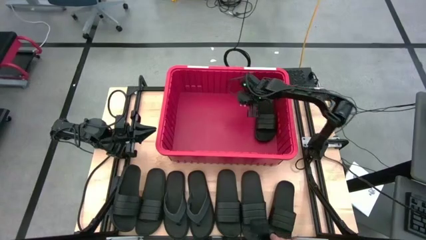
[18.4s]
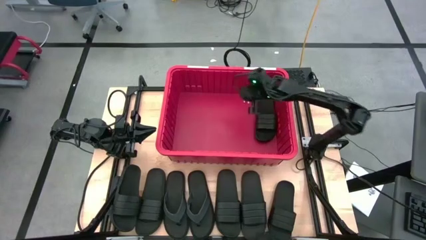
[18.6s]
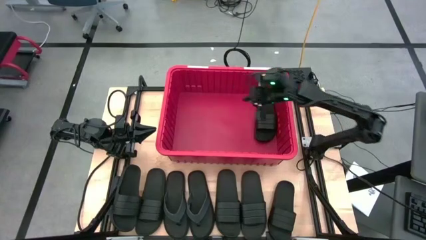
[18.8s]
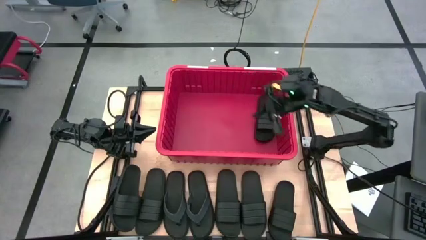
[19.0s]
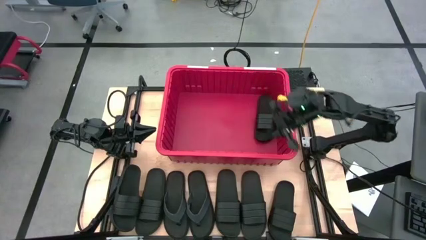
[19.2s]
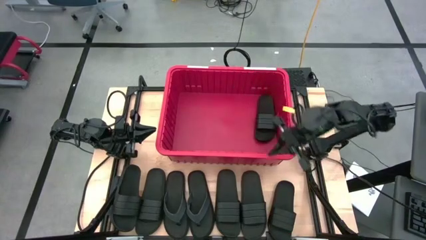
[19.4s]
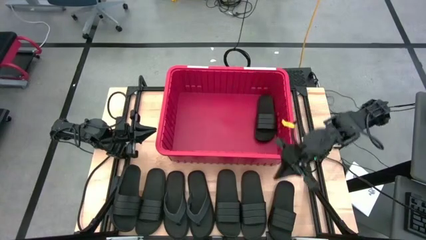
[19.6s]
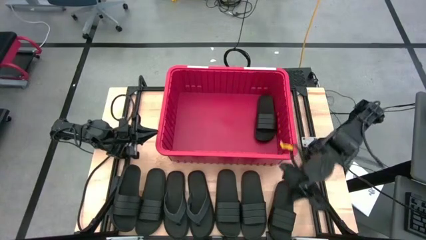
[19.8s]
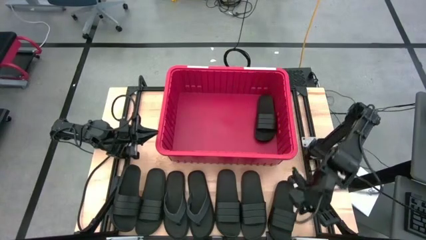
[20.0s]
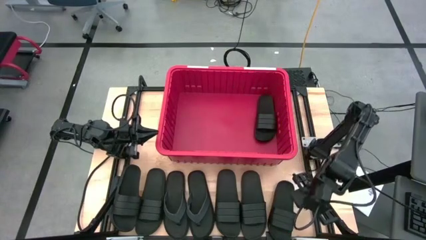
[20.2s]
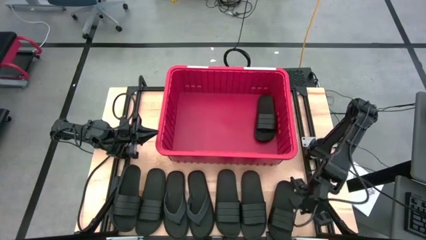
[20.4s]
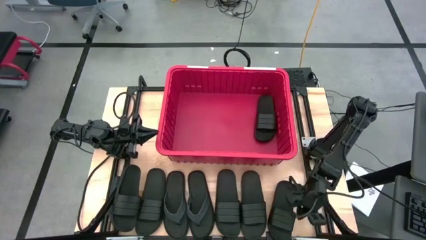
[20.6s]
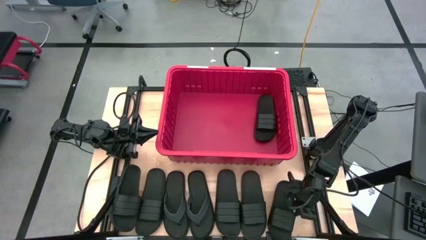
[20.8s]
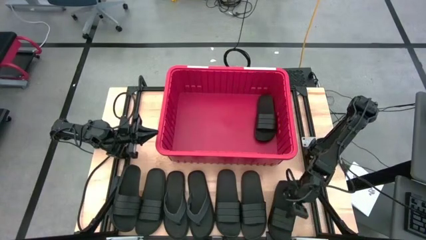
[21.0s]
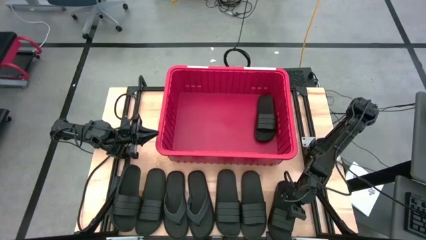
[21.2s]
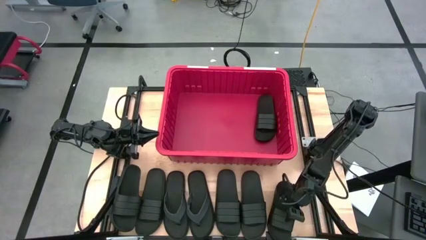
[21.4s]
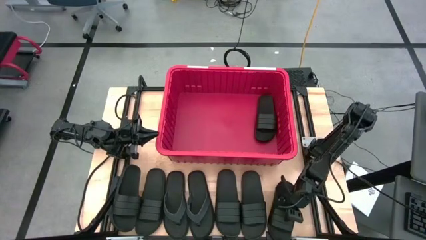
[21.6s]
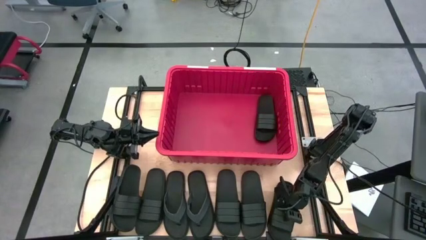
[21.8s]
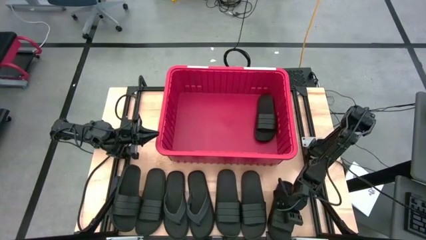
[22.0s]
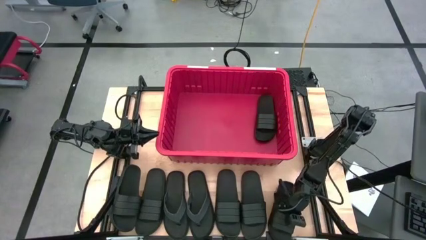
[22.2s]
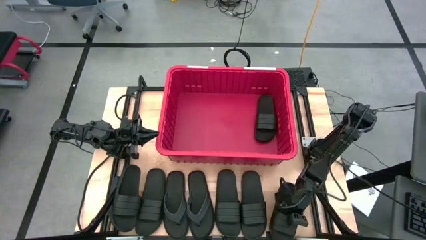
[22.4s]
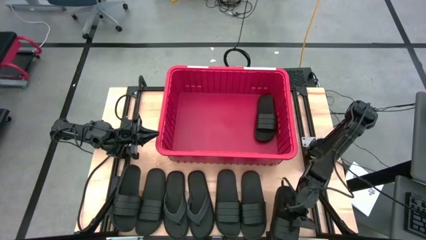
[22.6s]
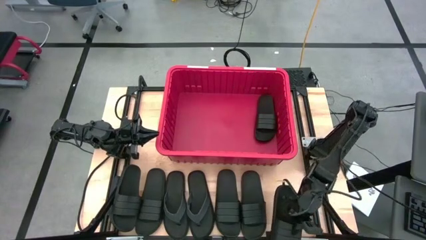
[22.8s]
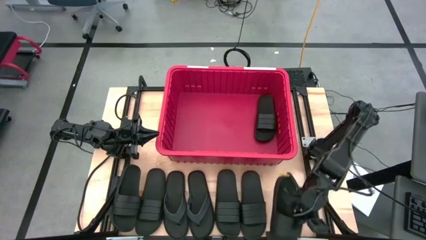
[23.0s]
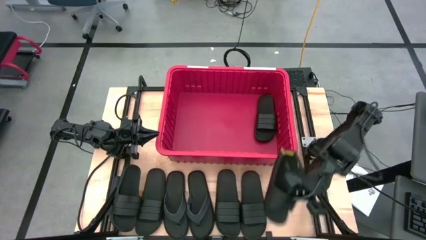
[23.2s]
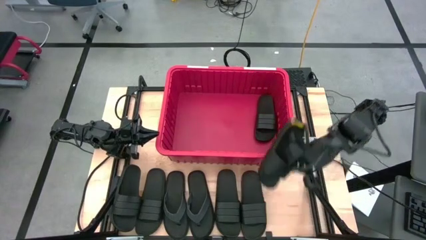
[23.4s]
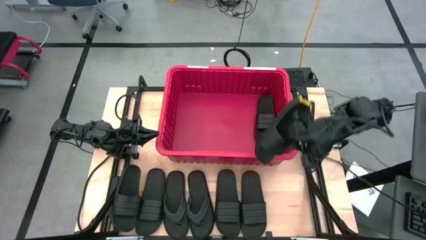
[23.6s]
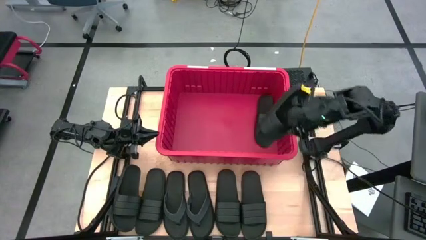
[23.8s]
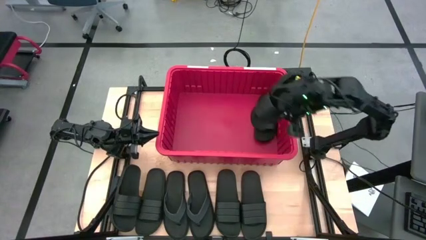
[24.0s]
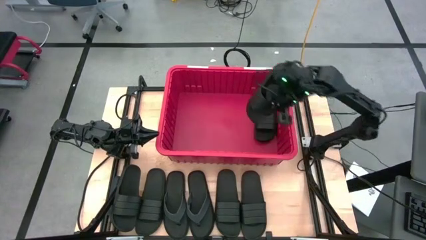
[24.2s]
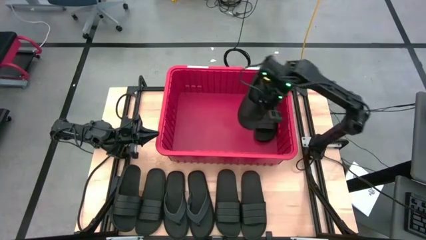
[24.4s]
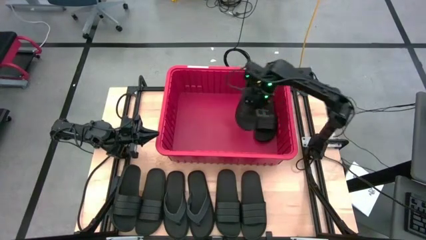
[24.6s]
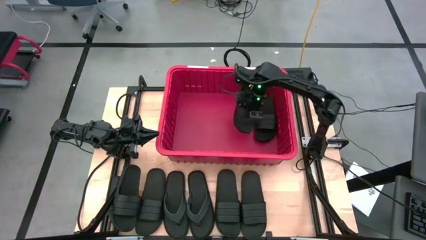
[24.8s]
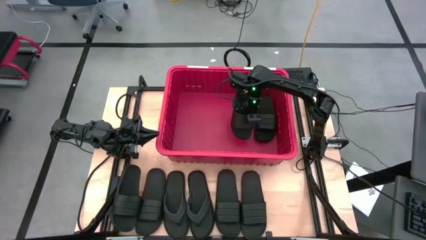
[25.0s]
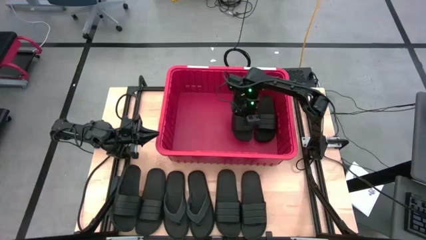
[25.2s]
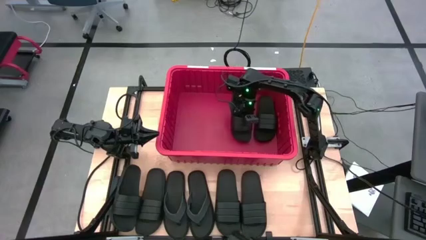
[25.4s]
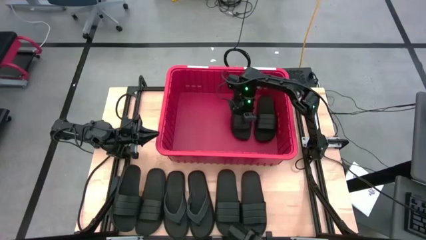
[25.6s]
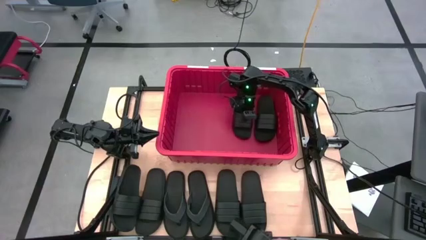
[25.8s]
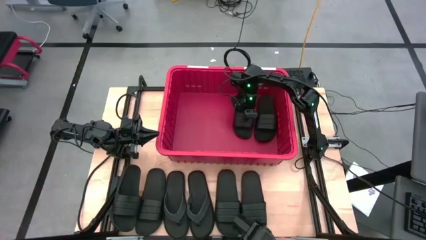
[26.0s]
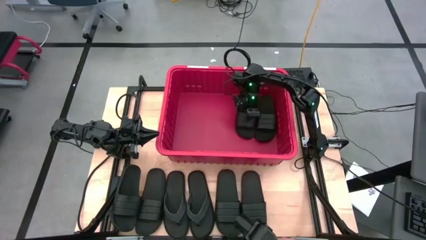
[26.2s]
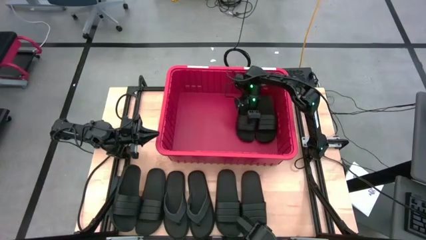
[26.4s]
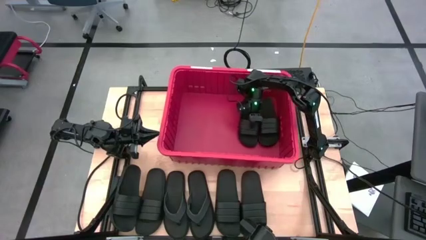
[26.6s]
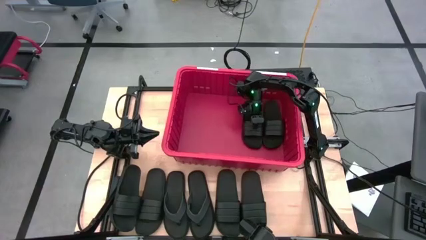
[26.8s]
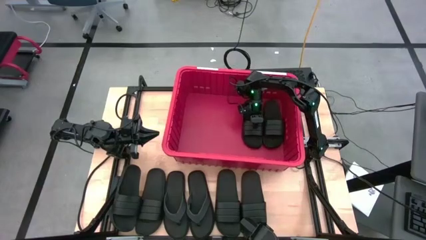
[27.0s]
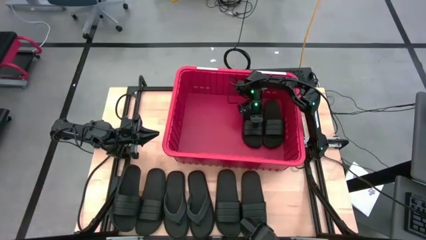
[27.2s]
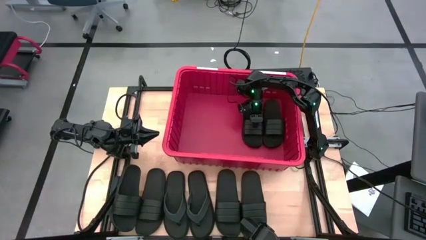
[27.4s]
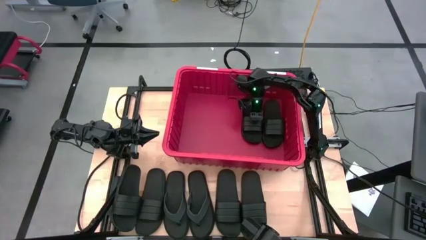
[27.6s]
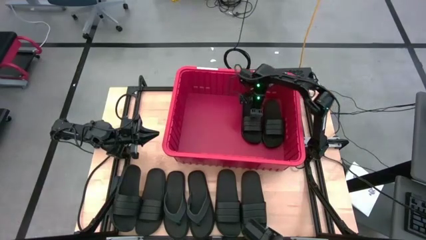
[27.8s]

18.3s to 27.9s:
Task: Pick and place slides into bin
Put the black slipper into the red bin

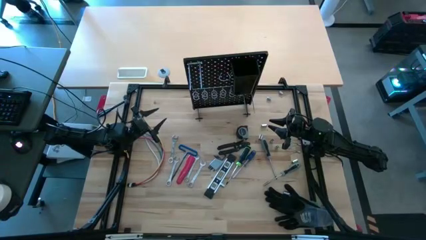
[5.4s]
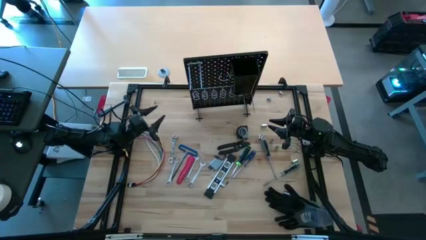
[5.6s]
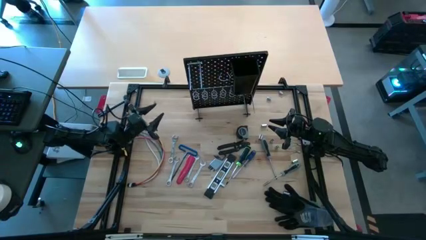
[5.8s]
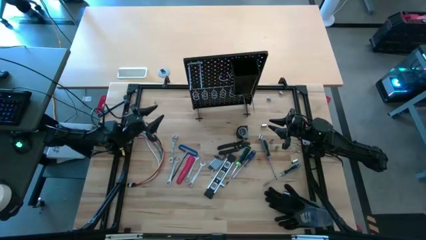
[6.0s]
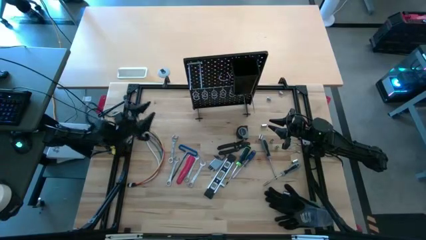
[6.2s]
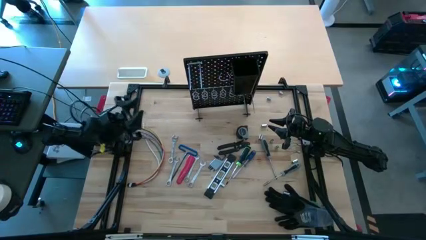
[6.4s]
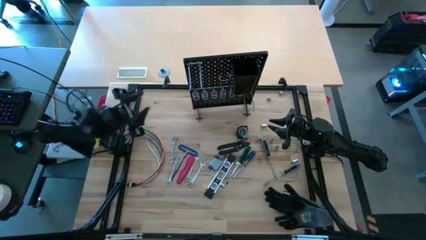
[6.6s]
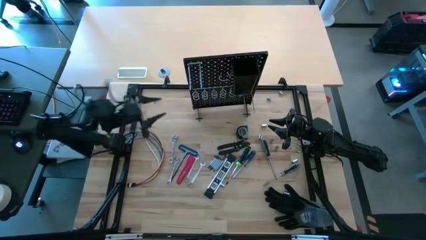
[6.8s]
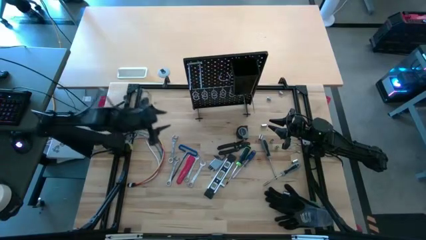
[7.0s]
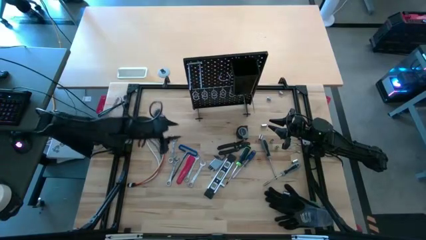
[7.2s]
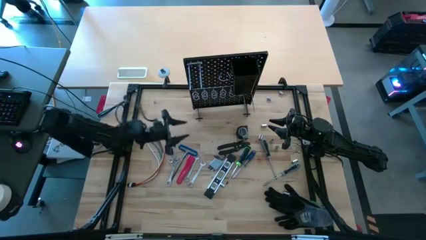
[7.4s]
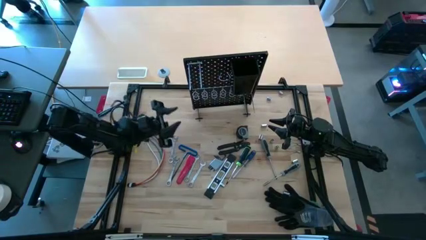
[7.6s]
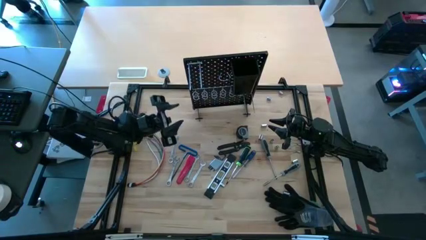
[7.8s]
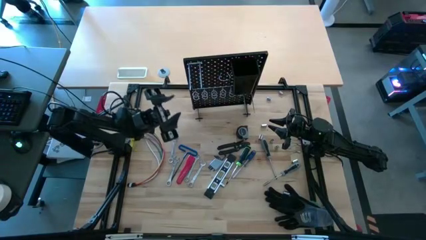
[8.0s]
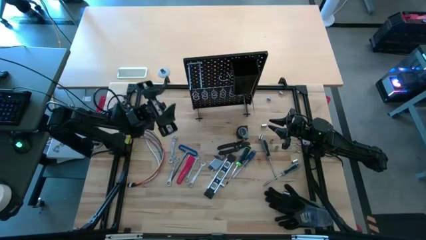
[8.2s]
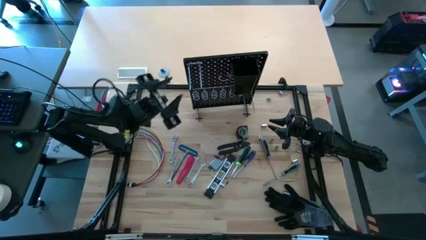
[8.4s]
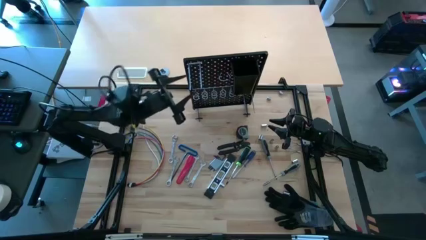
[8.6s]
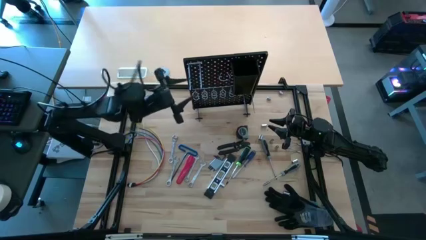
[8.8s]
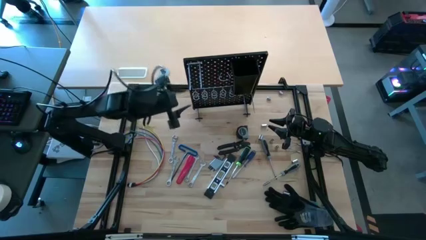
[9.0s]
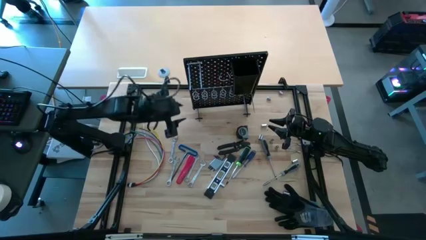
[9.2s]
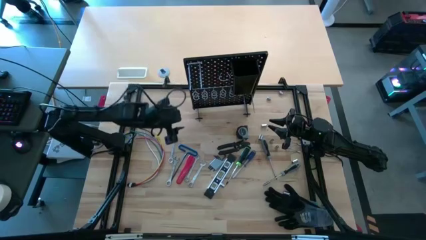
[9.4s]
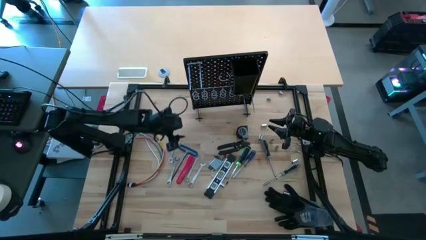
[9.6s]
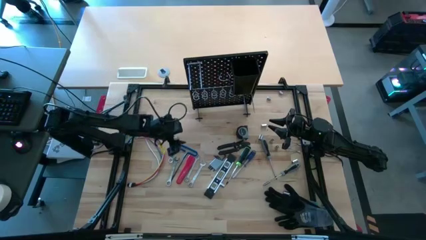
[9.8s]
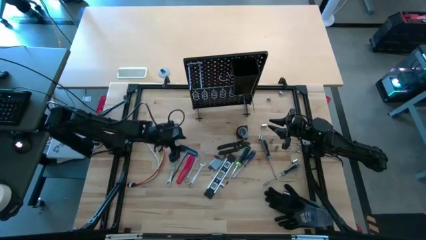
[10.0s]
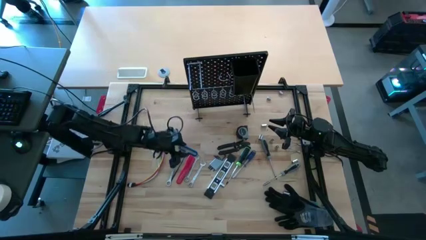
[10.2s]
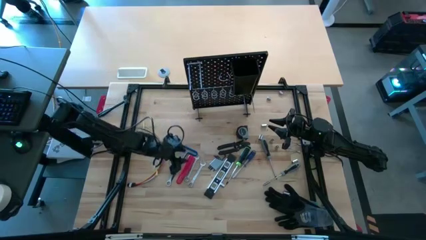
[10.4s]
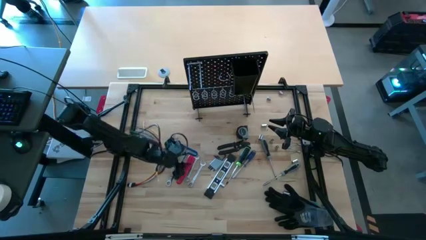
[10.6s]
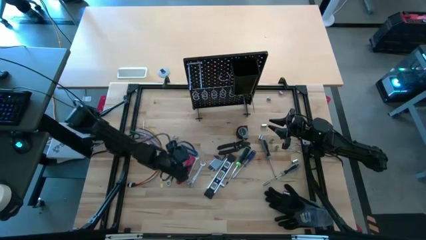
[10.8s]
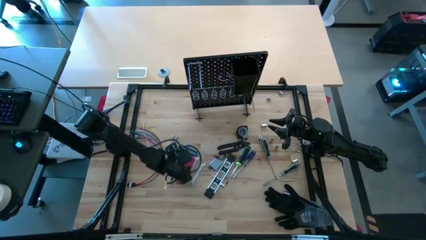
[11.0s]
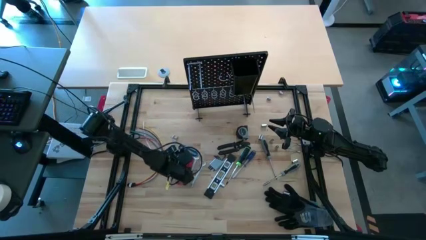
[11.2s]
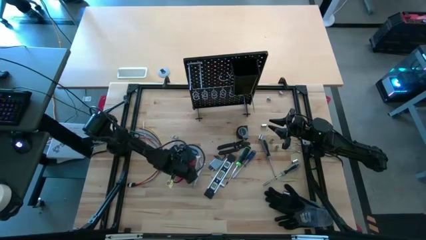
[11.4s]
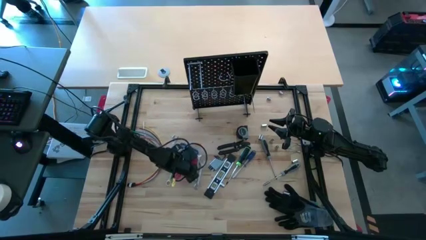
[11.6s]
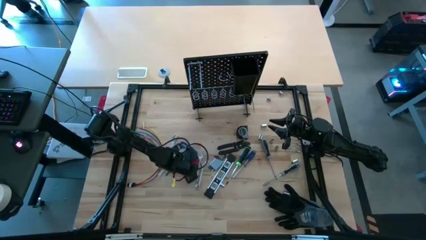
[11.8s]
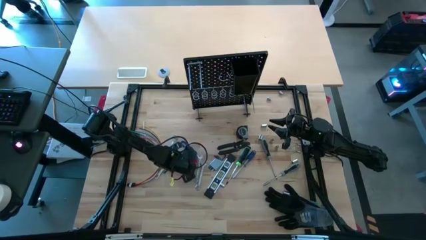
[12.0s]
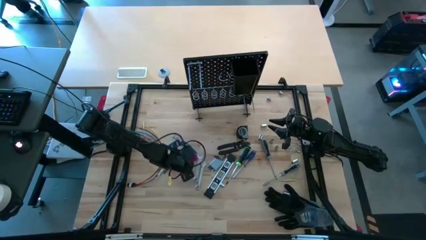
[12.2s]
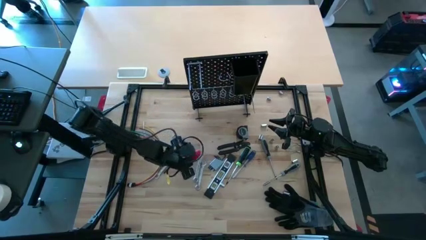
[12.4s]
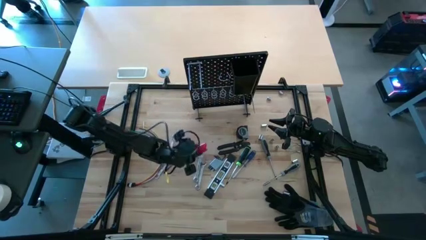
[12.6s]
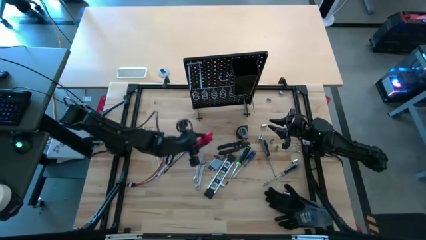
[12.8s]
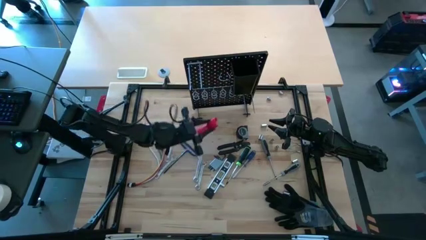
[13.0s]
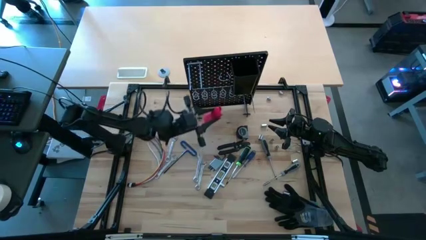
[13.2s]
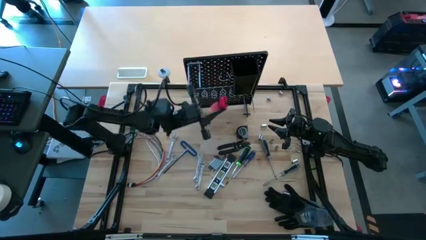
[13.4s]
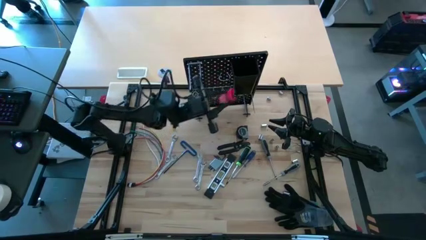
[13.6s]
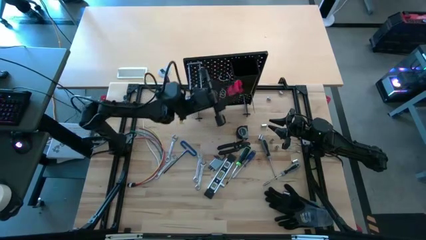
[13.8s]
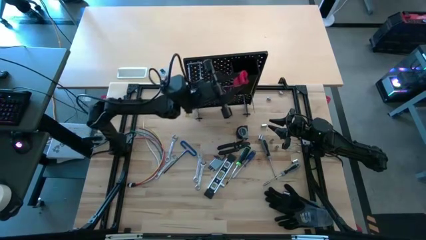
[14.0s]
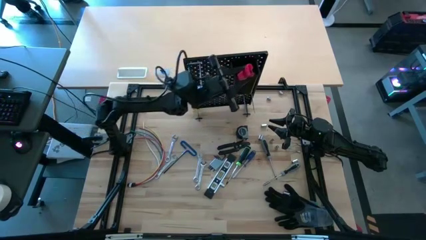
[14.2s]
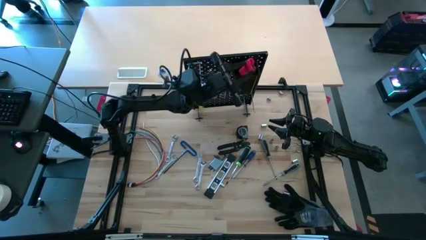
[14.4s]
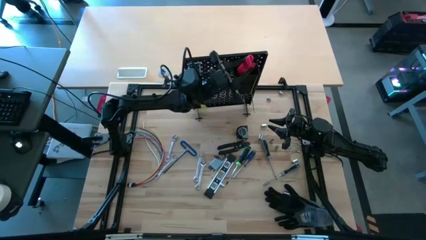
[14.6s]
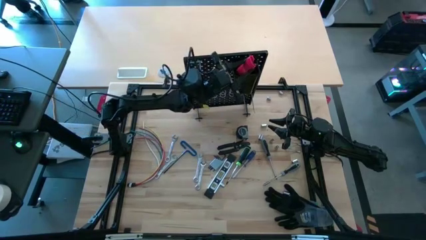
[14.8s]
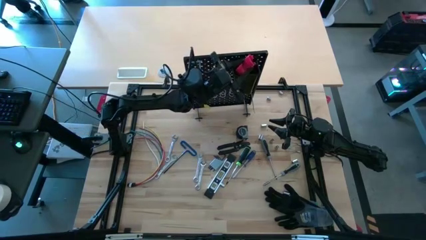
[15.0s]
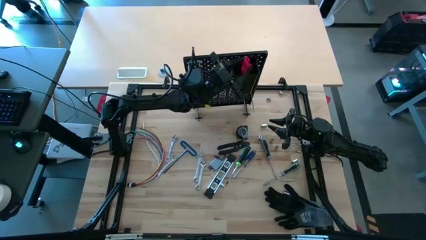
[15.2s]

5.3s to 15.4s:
Task: Hang tools onto peg board
Put the red cutter blade into the black bin on the peg board
